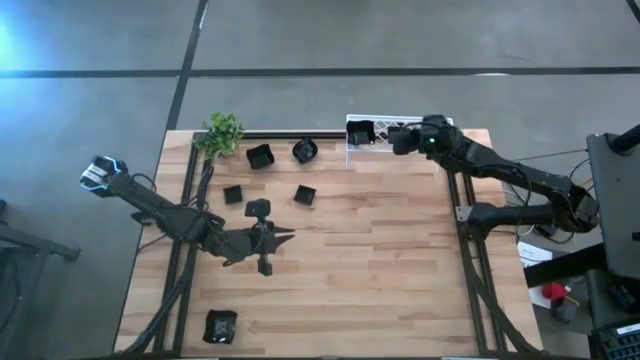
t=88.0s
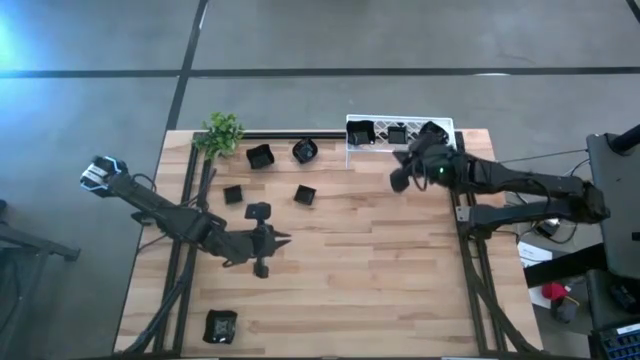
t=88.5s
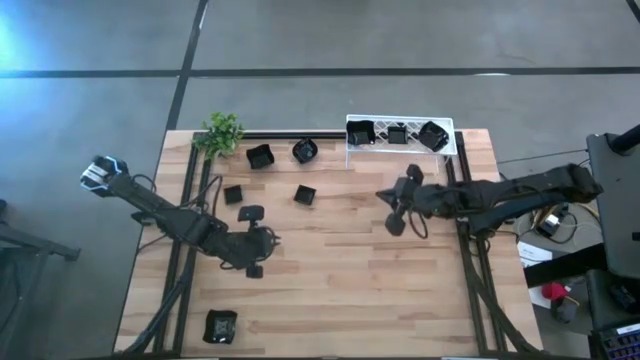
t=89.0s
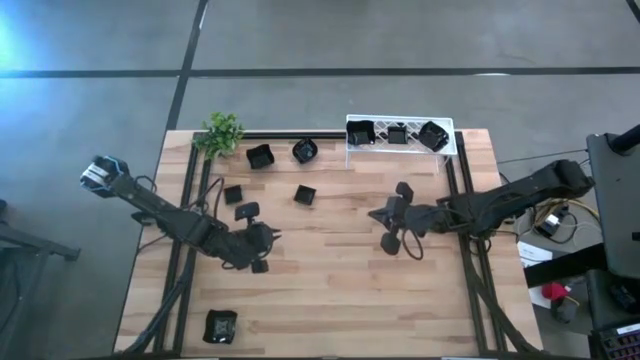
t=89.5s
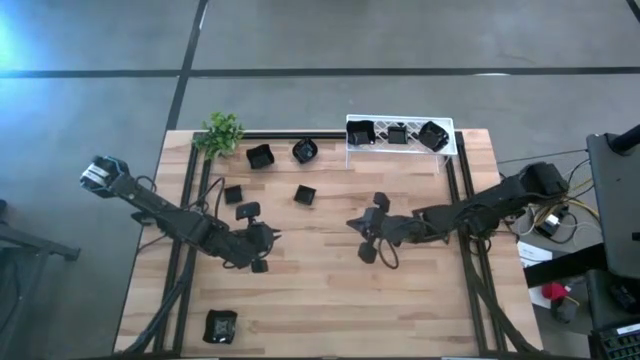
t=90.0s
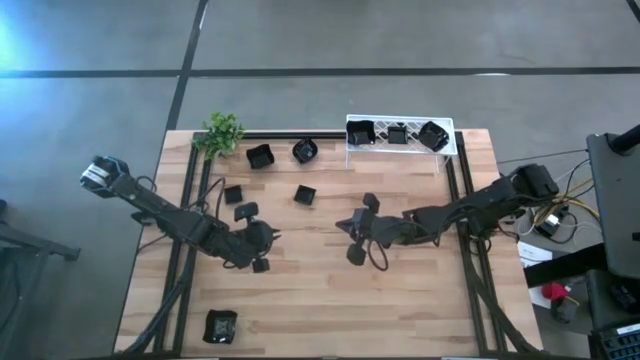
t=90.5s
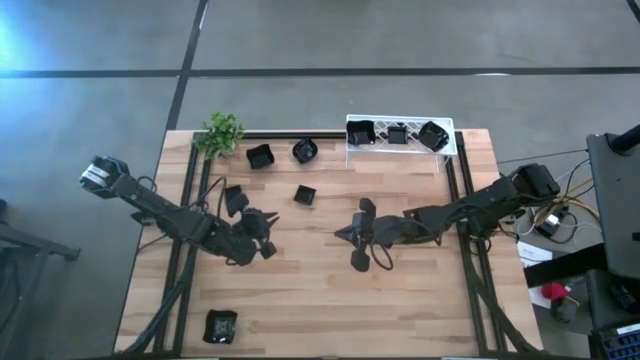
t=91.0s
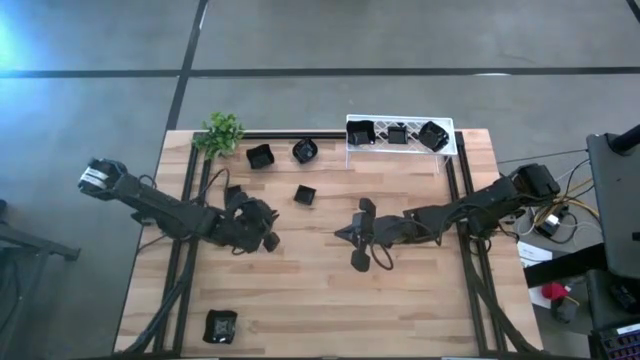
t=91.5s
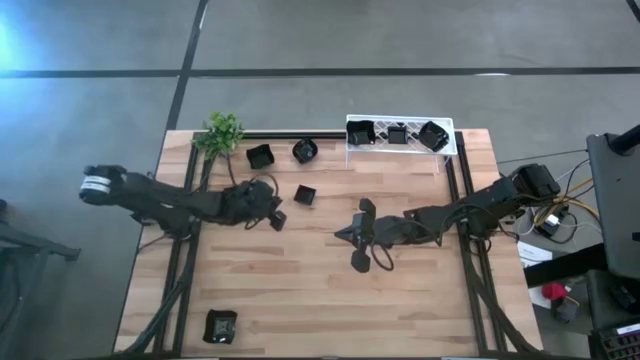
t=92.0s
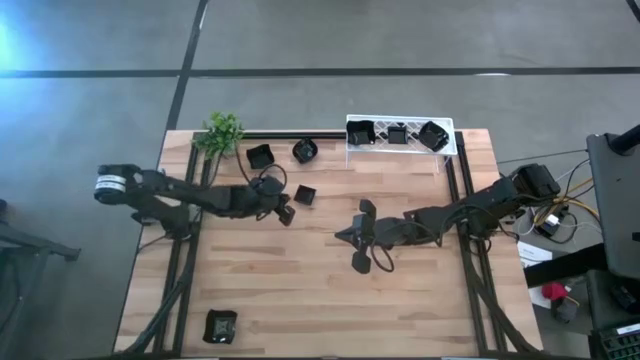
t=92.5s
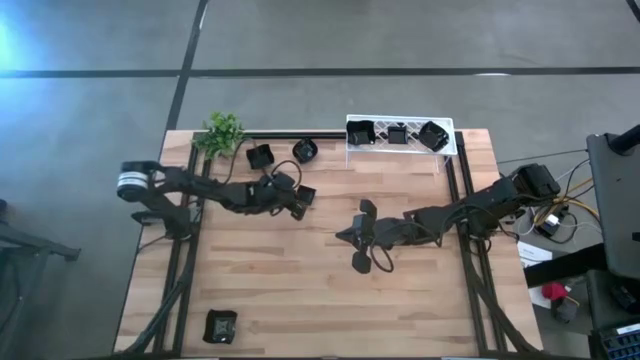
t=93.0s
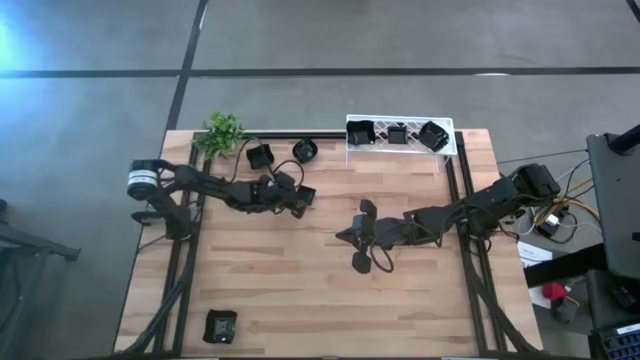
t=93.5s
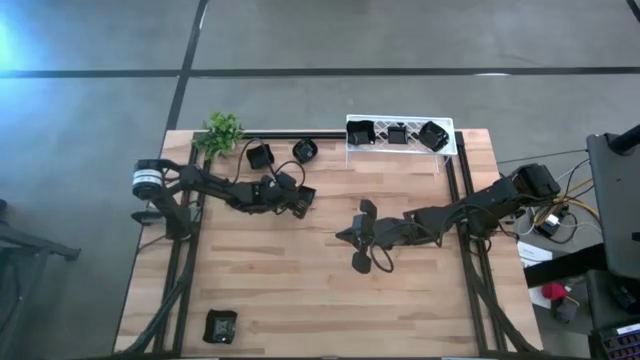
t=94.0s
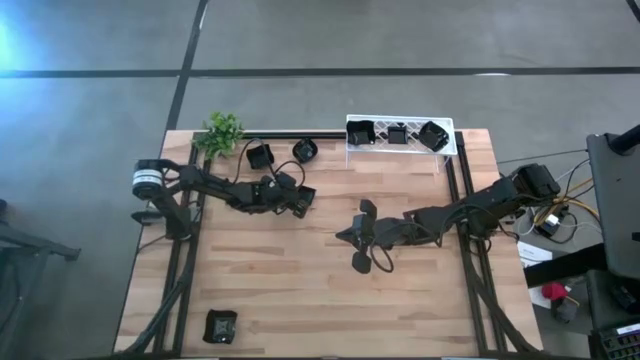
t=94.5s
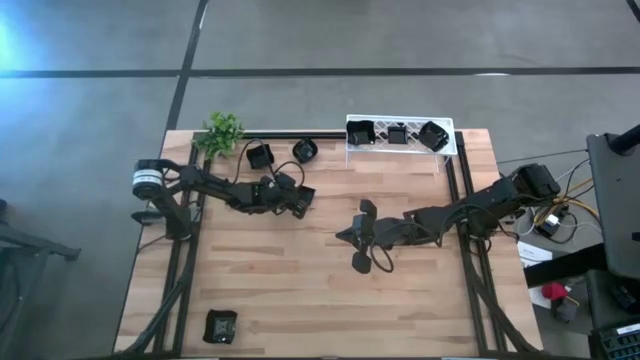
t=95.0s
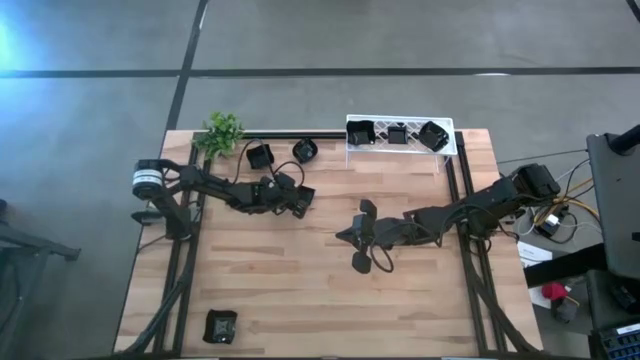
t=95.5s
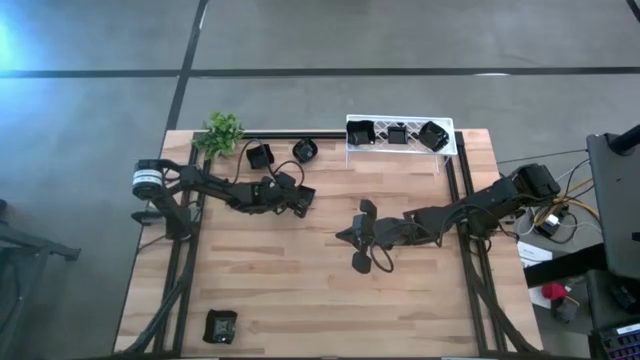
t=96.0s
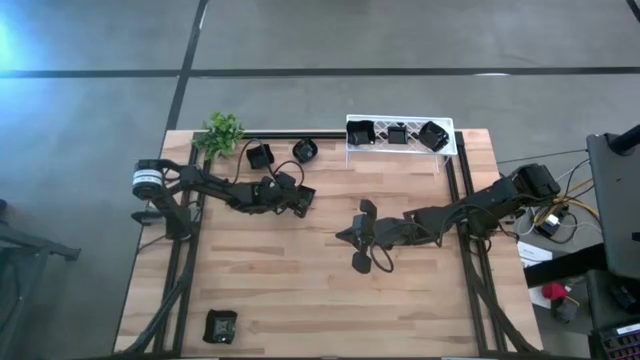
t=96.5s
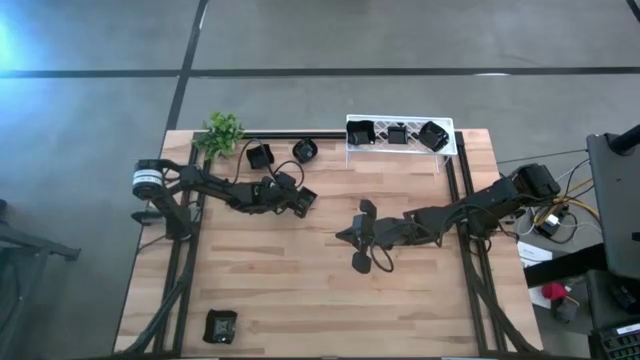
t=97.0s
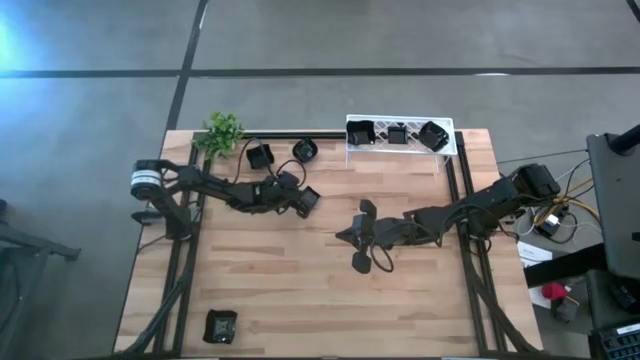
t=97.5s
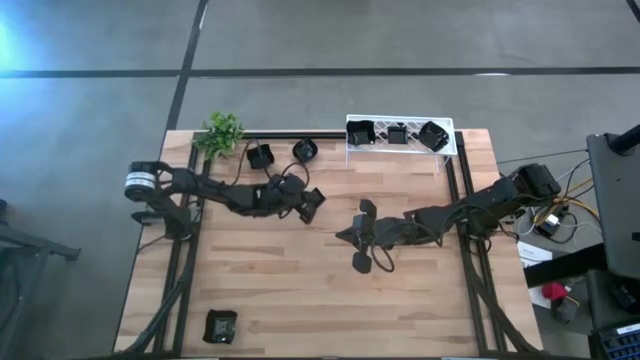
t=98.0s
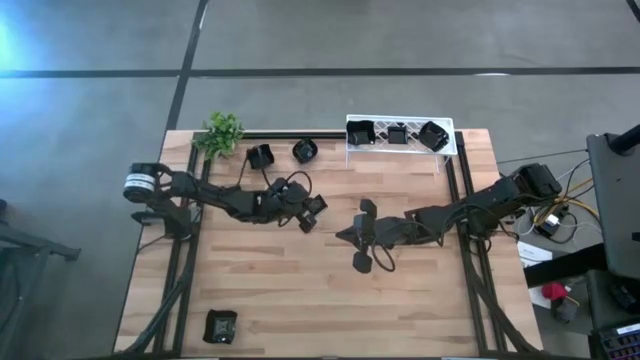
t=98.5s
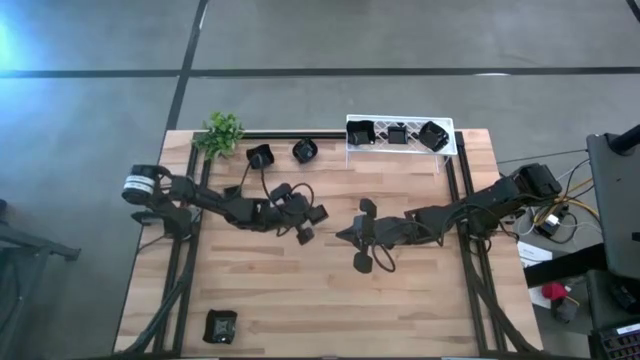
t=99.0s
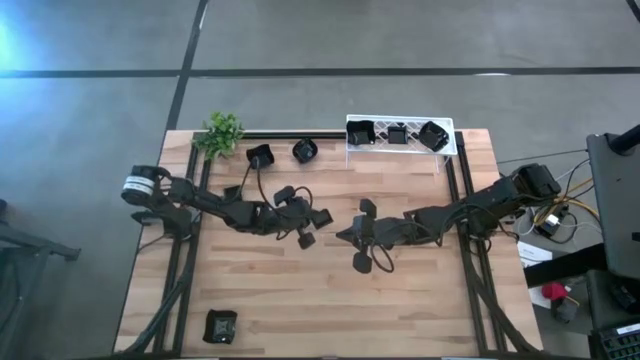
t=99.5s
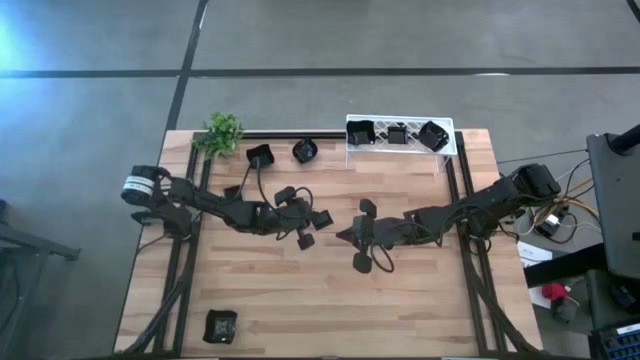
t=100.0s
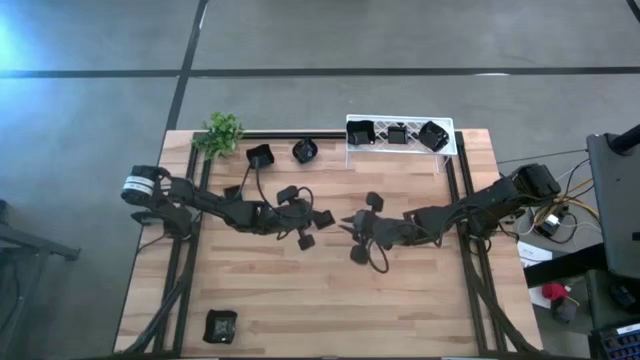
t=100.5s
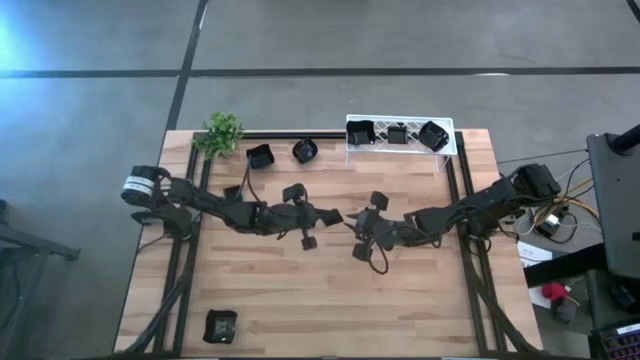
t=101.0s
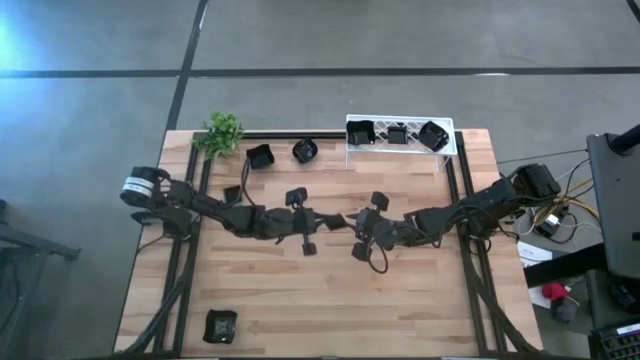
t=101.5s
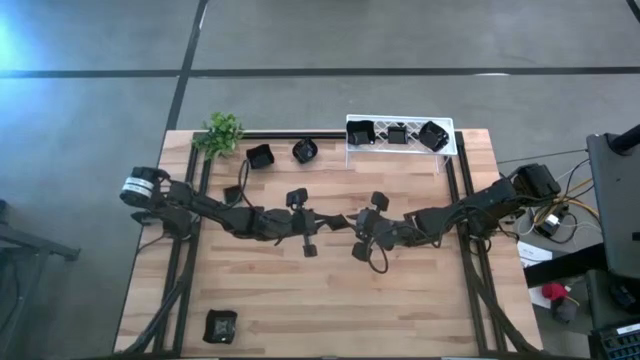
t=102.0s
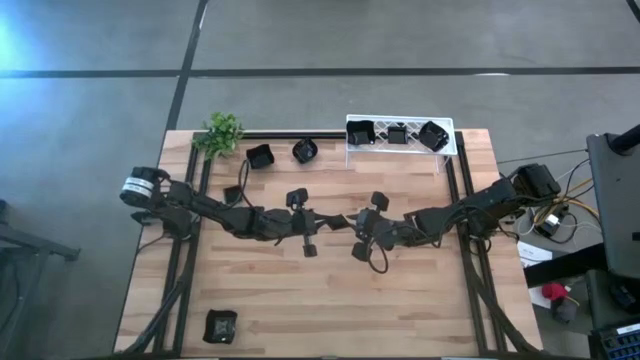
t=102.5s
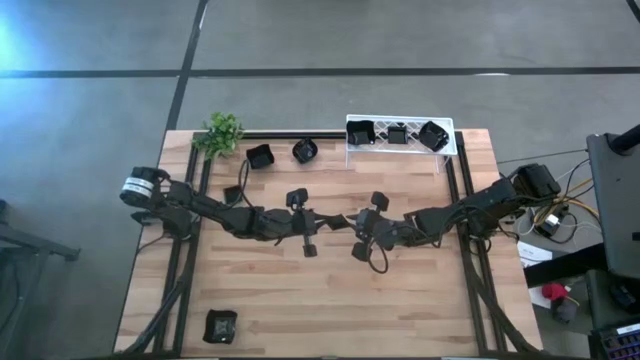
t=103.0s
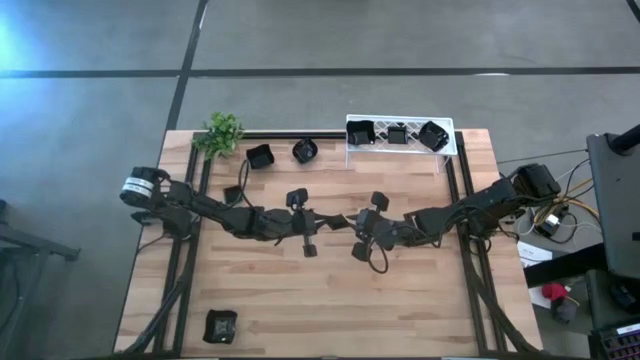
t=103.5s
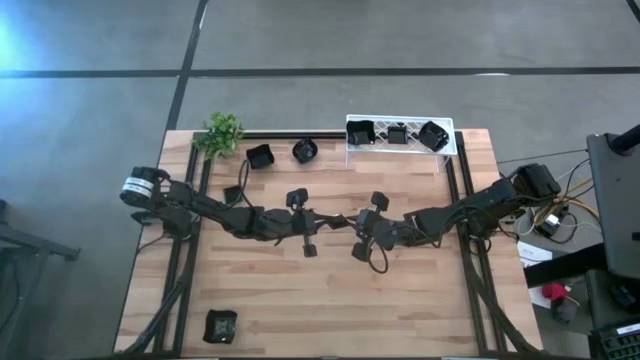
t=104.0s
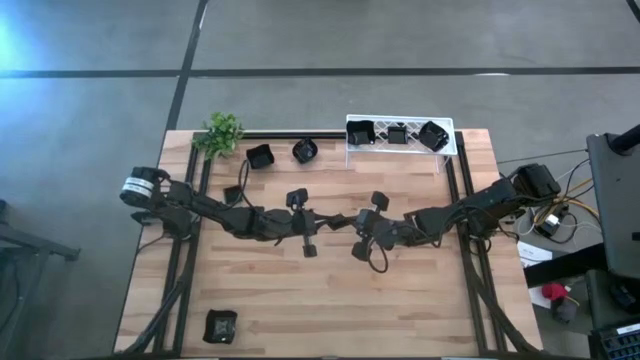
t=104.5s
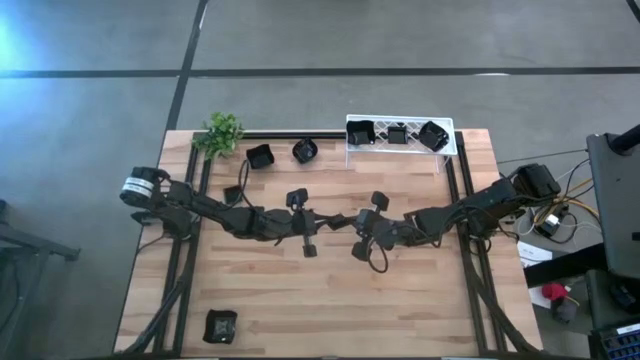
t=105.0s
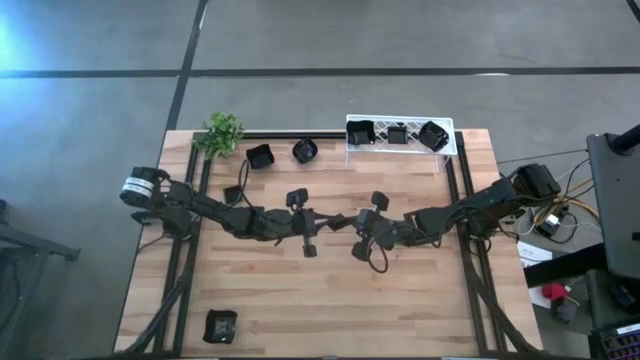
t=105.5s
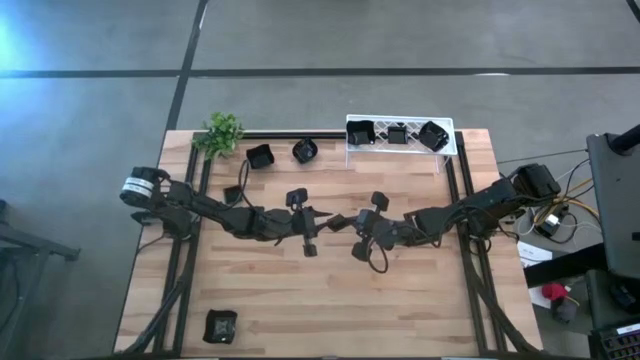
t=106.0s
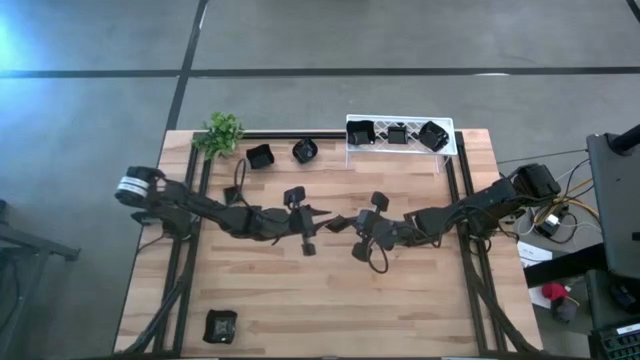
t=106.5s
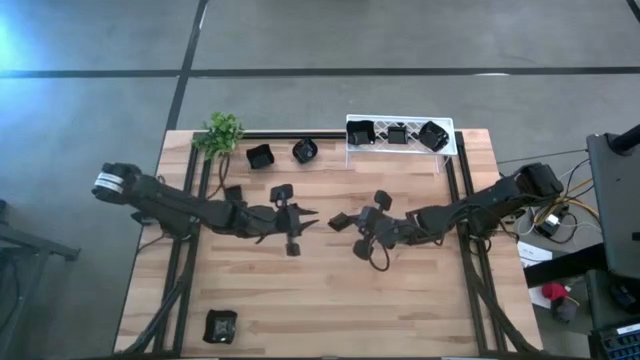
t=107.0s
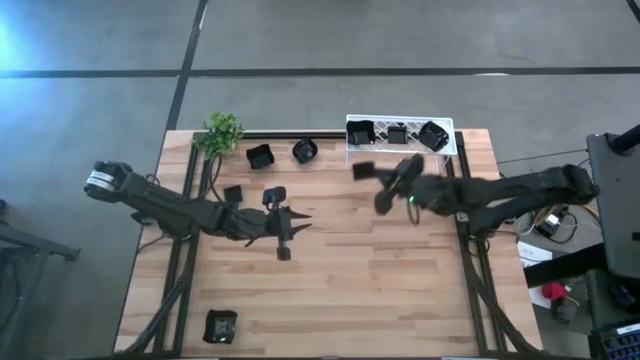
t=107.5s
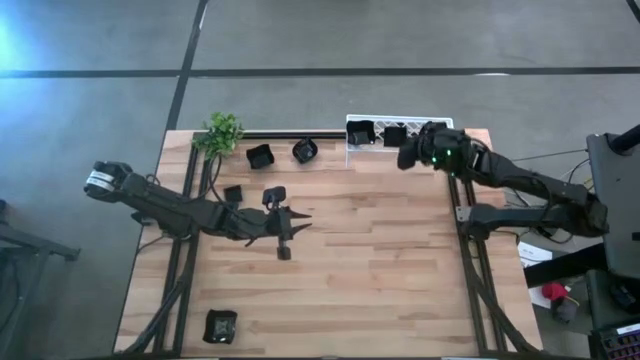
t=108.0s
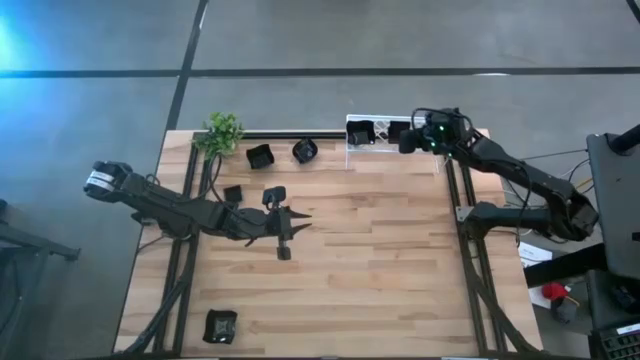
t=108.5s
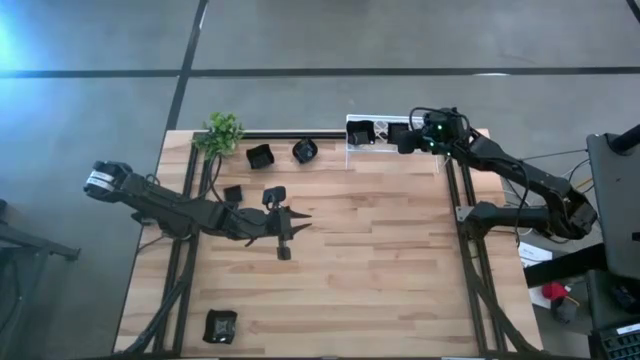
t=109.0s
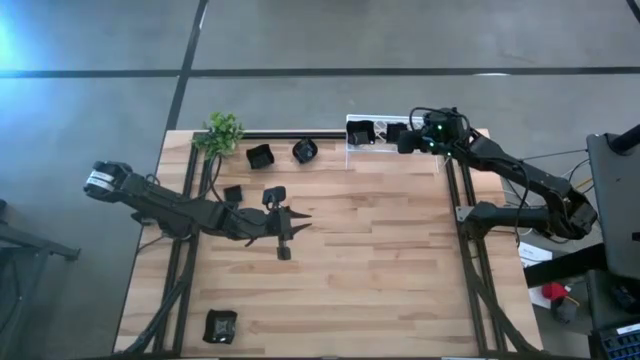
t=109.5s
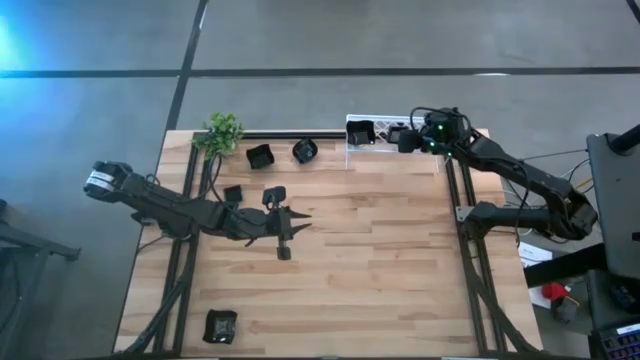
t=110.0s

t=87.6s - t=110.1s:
Task: Pick & Place Mini shaped plates
Stack the black square plate on top of the black square plate on the shelf
